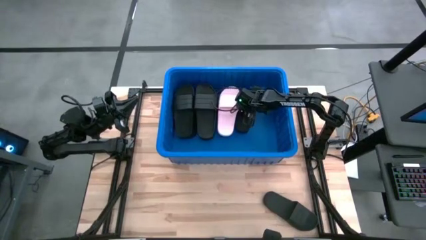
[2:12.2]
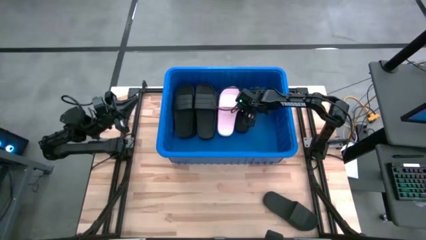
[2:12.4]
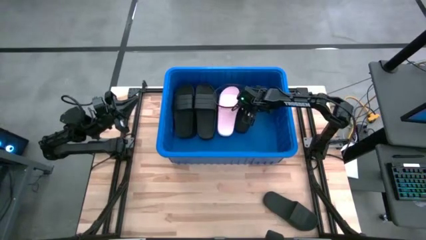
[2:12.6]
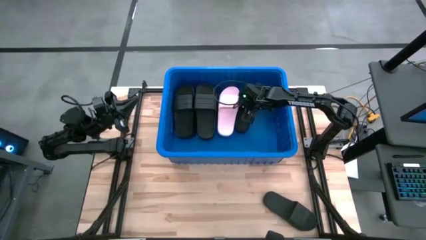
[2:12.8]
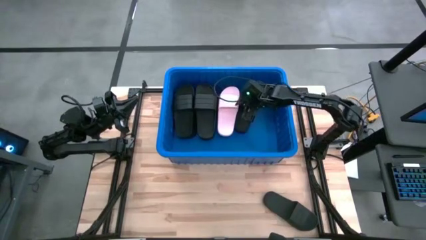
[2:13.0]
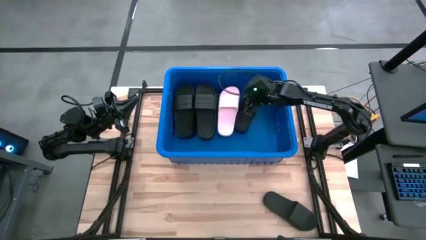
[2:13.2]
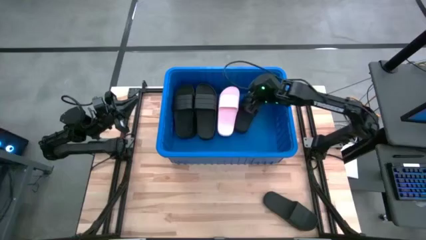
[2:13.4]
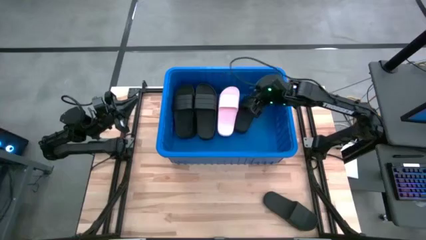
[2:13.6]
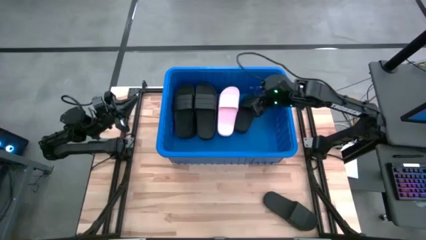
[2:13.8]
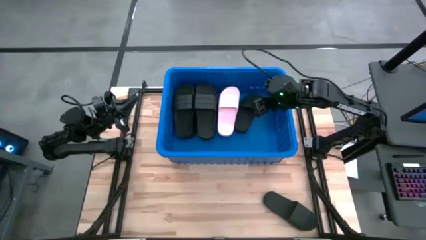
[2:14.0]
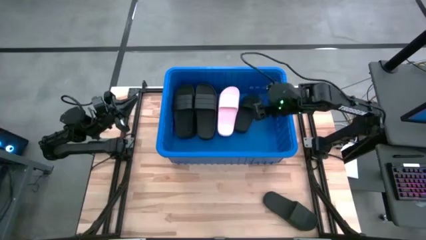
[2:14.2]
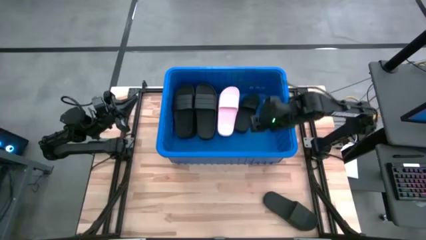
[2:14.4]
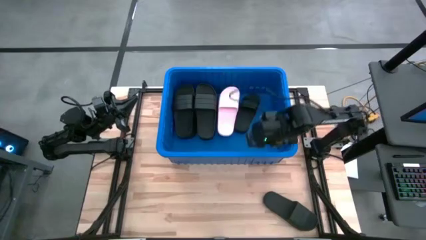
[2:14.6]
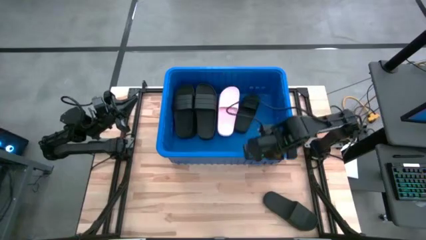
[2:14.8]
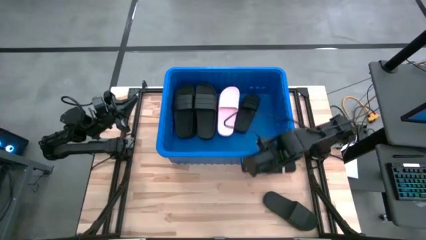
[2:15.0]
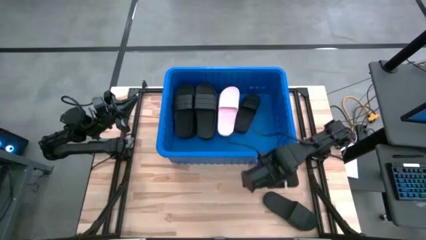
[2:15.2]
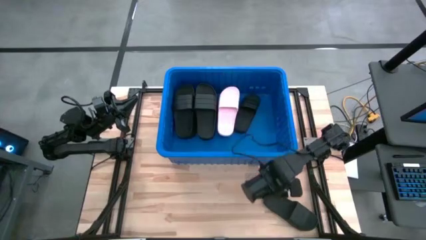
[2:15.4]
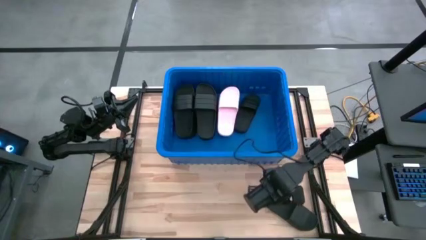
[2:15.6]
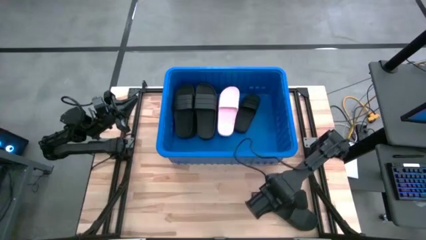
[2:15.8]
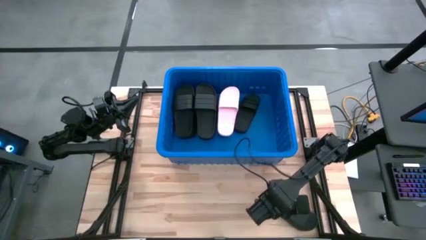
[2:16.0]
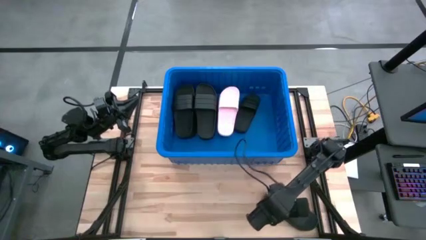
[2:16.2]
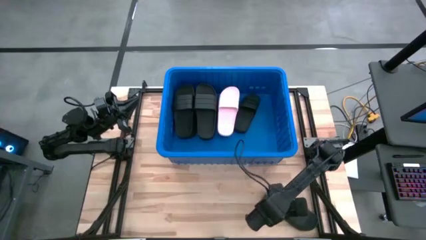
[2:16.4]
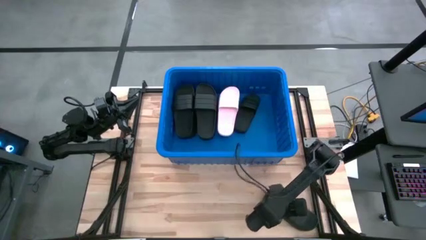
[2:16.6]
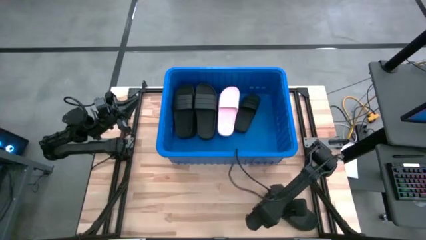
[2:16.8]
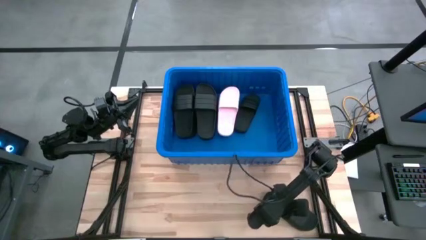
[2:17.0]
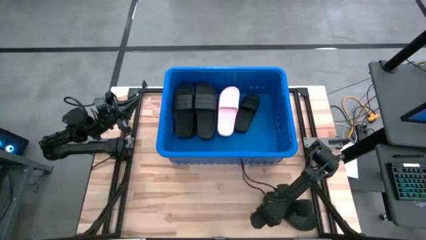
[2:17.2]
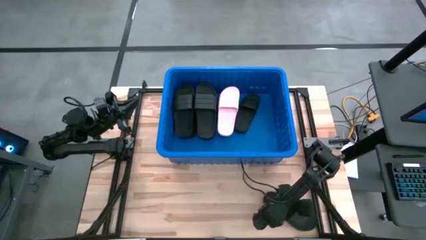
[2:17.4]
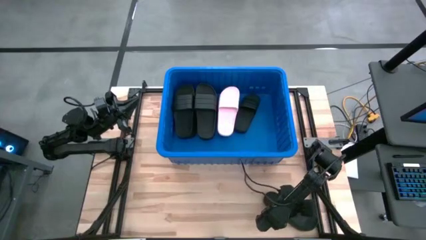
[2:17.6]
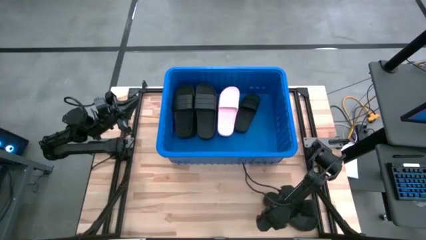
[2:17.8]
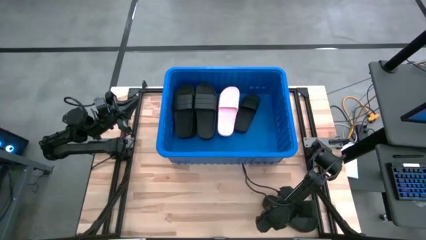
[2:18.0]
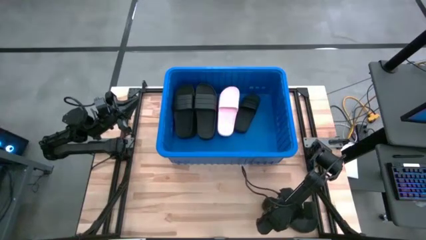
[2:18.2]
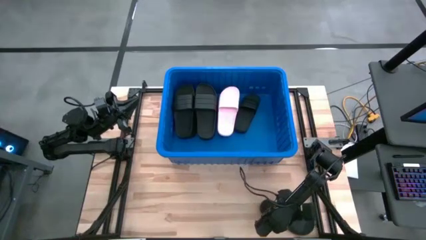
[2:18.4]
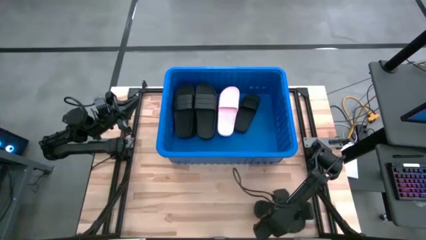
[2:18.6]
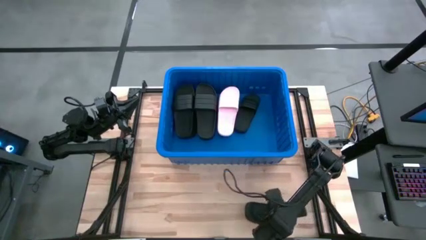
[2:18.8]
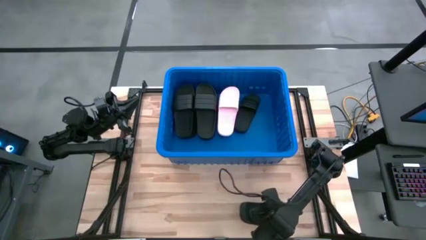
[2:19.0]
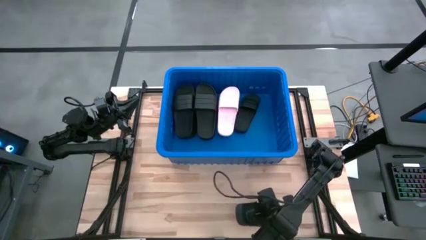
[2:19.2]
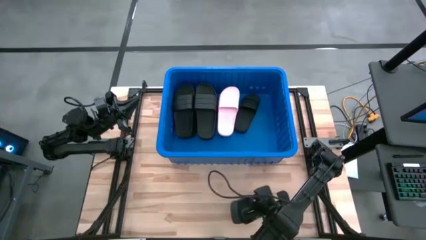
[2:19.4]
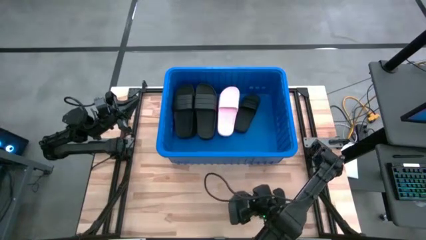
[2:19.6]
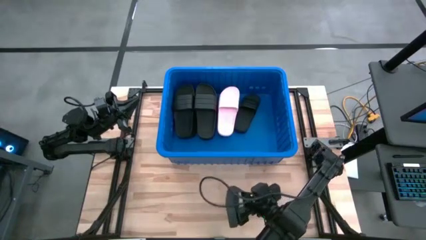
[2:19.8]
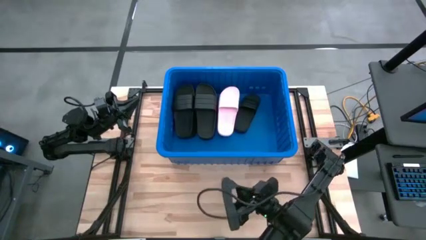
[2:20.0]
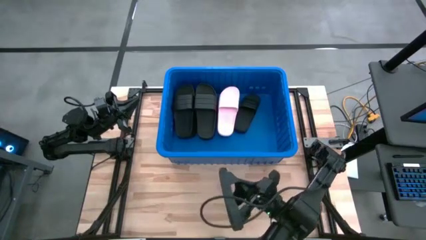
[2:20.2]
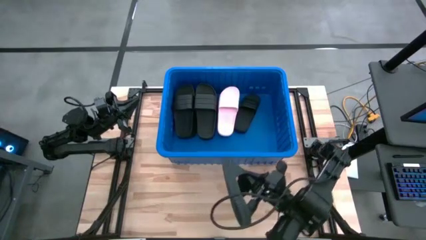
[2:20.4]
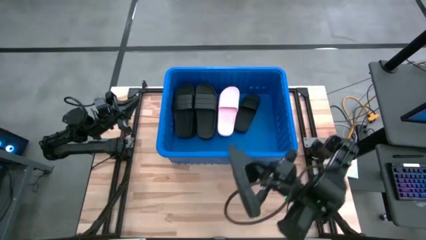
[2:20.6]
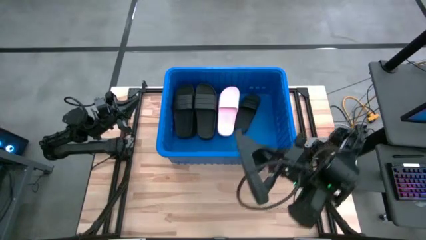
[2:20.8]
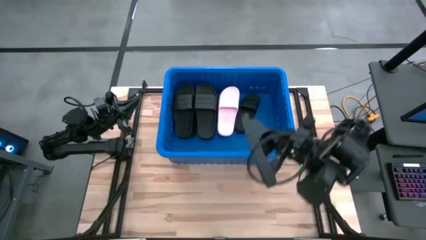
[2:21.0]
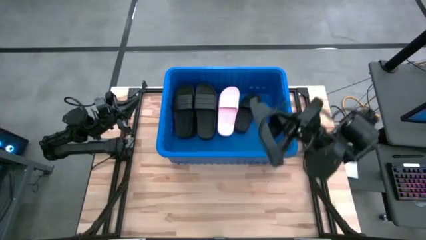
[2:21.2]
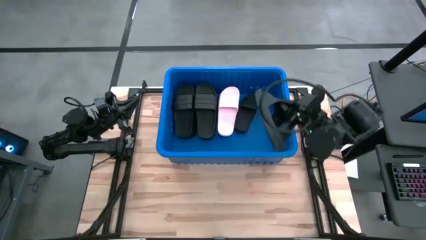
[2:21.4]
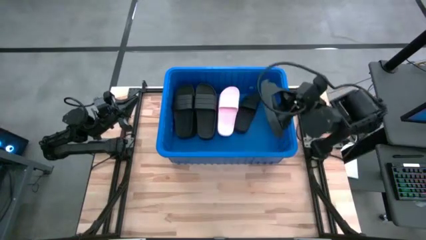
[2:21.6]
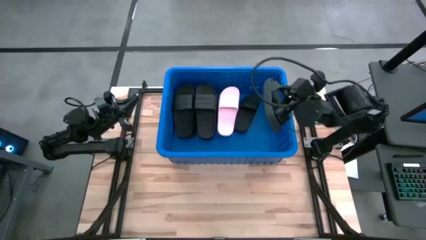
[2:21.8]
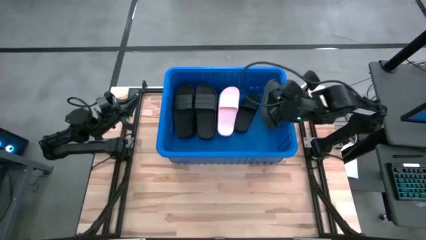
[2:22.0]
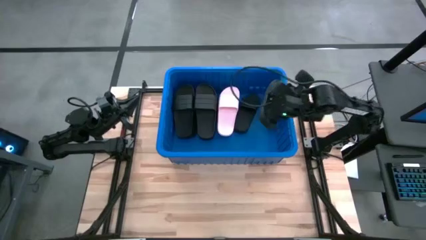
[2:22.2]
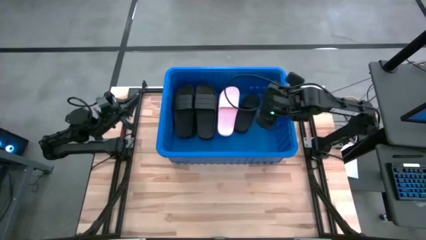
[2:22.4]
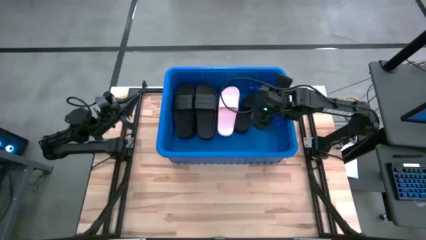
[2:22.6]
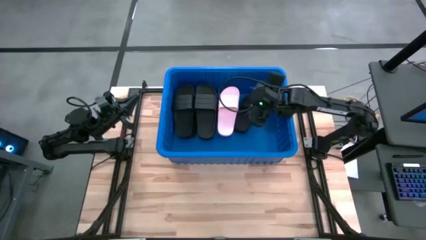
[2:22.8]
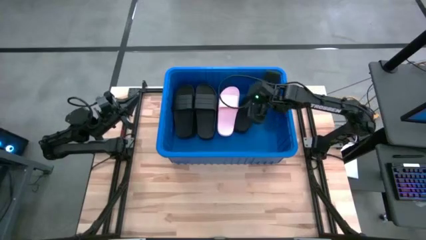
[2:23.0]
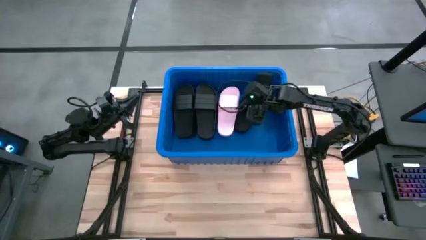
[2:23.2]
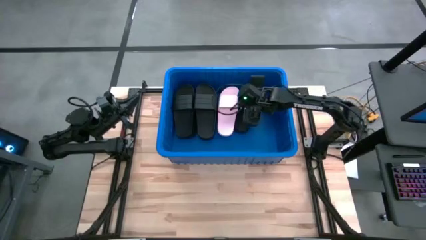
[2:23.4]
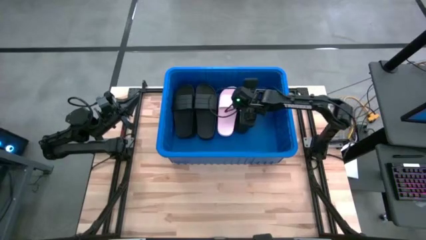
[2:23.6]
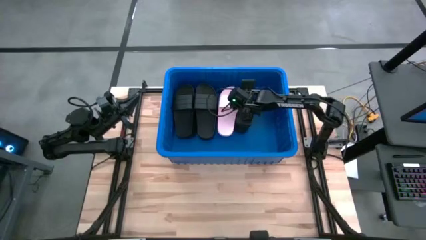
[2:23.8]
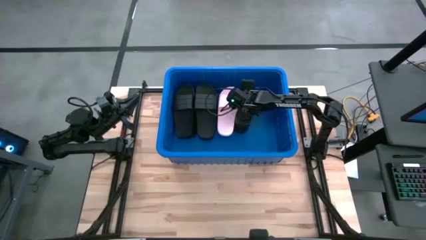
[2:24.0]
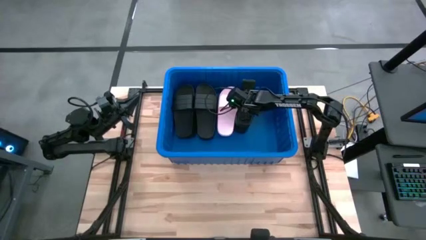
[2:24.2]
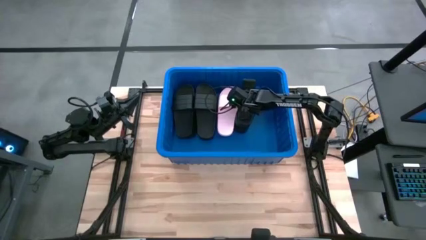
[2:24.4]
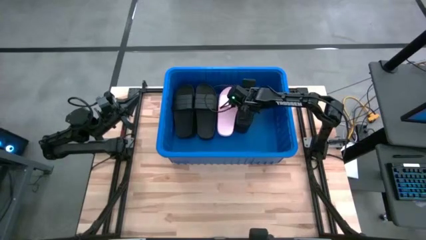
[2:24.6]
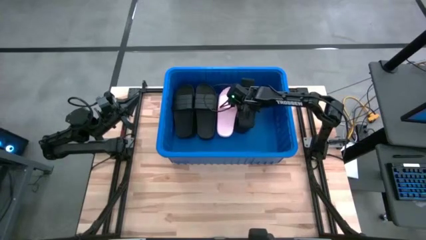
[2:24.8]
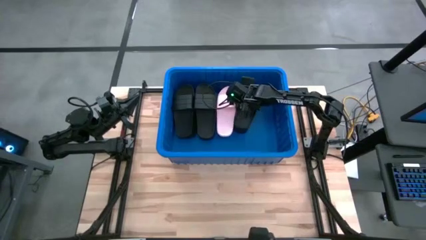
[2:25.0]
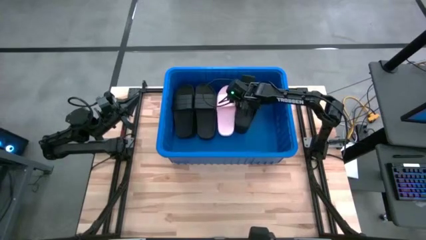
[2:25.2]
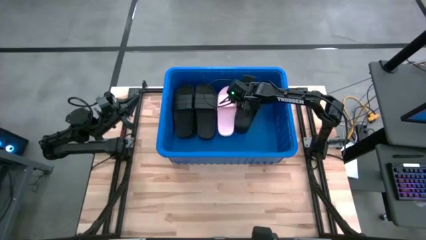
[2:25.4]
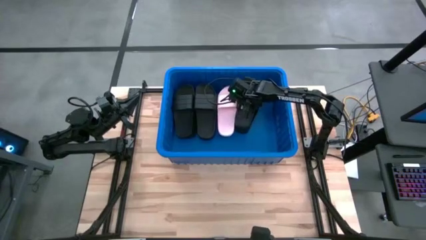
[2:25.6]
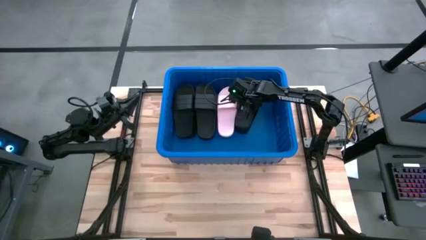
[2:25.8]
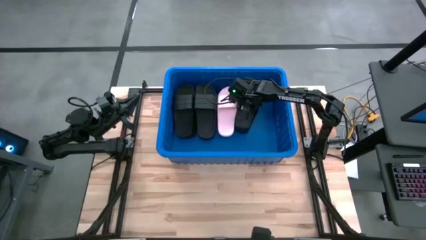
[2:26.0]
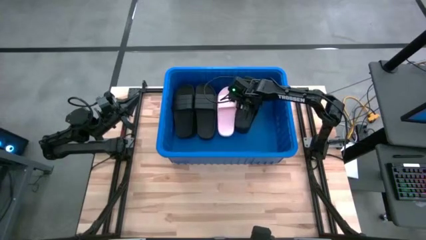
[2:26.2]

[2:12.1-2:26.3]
Task: Pick and place slides into bin
Put the black slide into the blue bin
